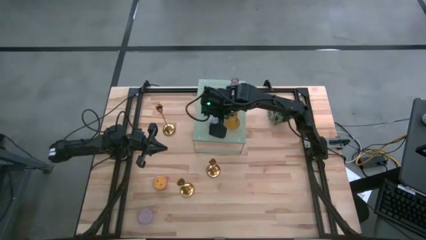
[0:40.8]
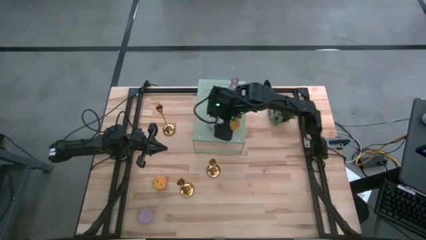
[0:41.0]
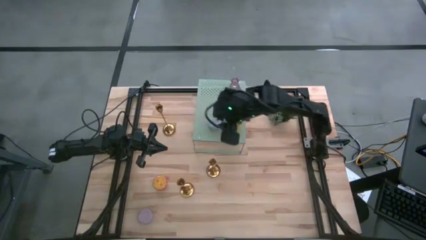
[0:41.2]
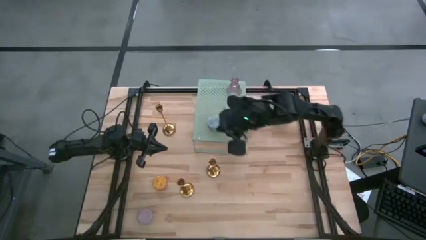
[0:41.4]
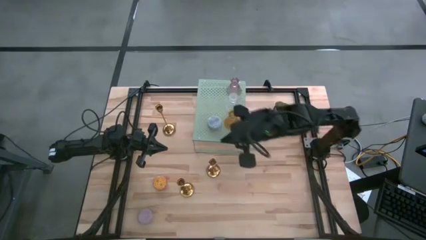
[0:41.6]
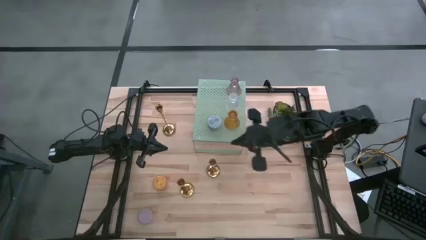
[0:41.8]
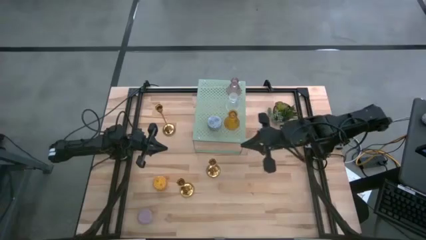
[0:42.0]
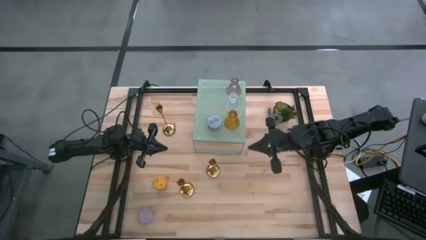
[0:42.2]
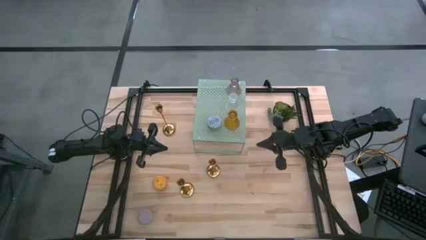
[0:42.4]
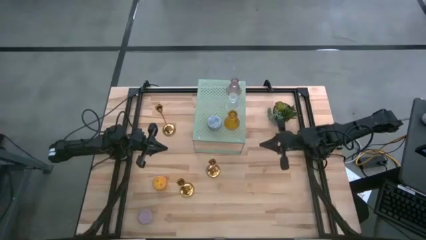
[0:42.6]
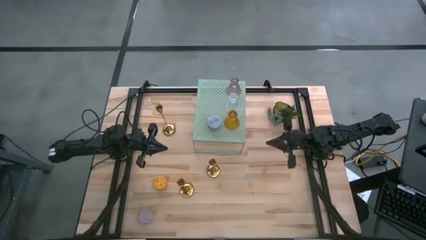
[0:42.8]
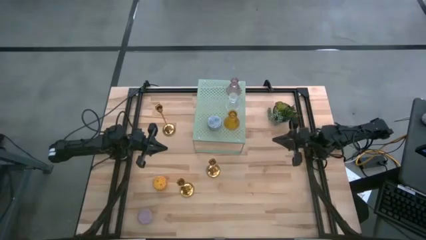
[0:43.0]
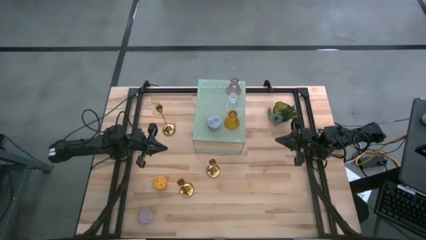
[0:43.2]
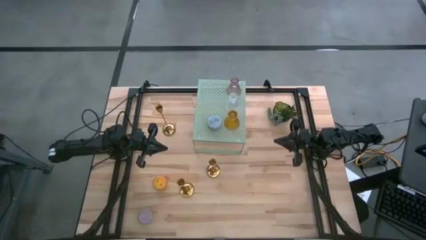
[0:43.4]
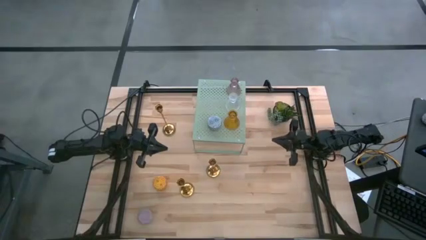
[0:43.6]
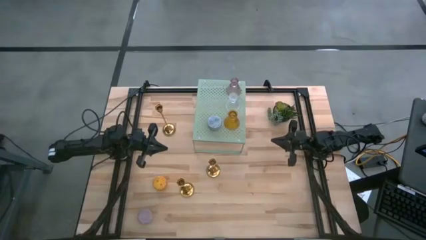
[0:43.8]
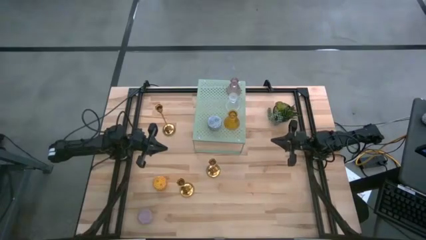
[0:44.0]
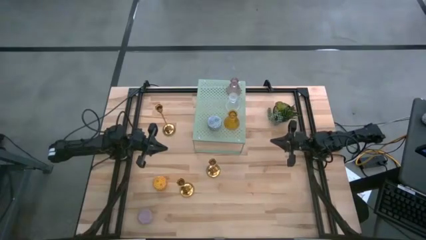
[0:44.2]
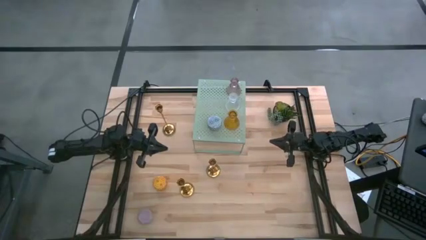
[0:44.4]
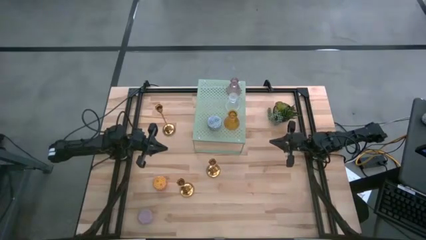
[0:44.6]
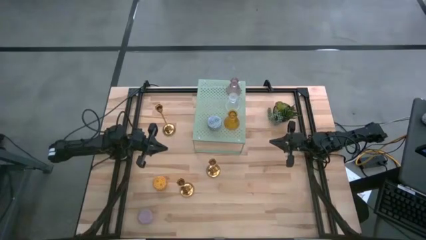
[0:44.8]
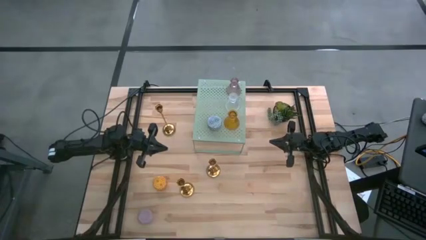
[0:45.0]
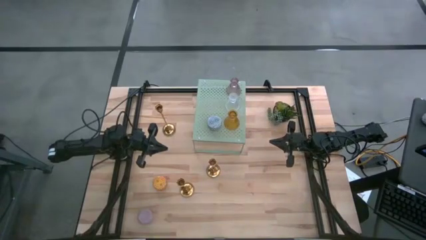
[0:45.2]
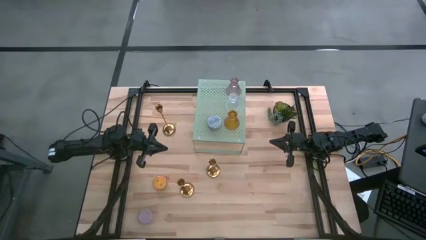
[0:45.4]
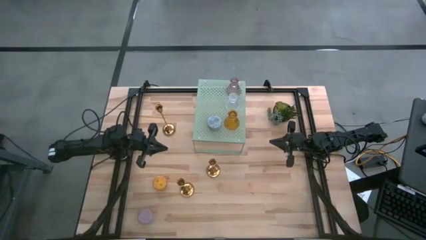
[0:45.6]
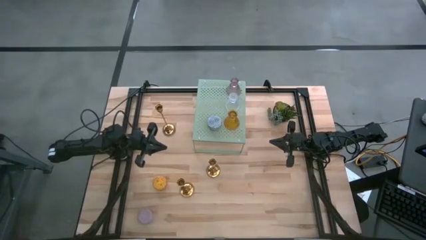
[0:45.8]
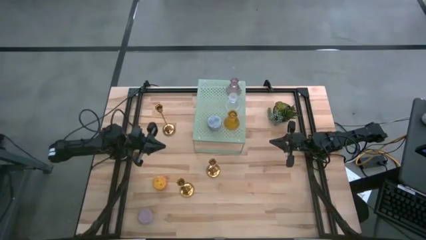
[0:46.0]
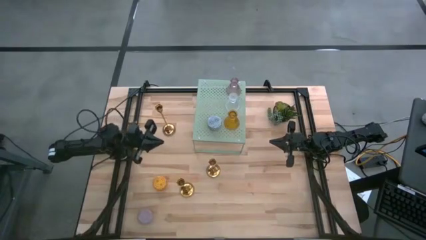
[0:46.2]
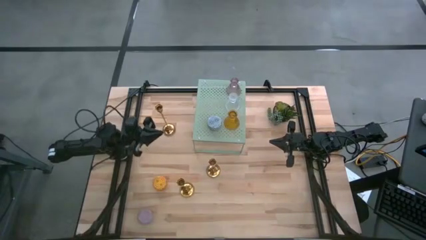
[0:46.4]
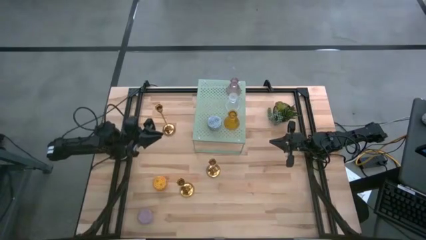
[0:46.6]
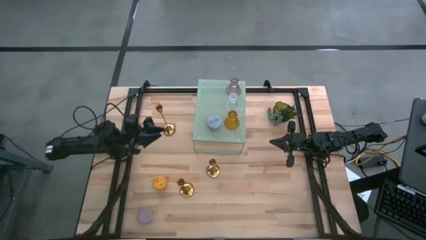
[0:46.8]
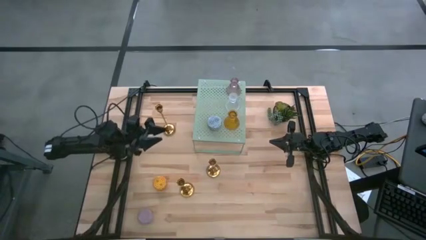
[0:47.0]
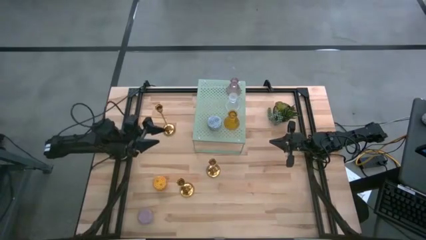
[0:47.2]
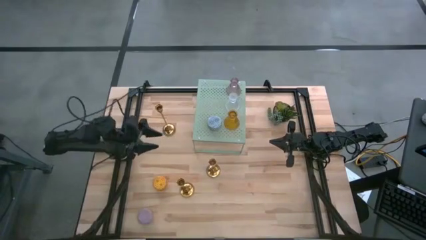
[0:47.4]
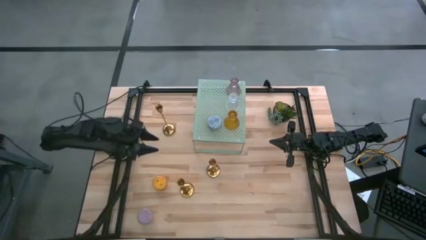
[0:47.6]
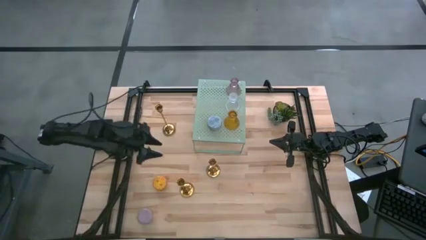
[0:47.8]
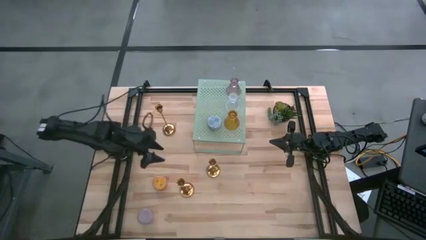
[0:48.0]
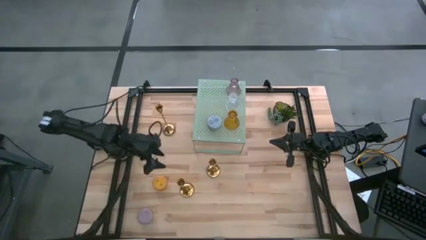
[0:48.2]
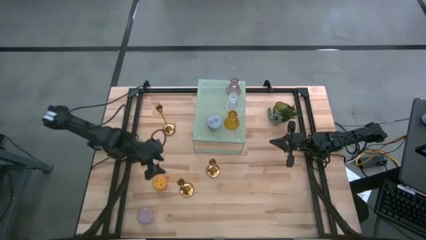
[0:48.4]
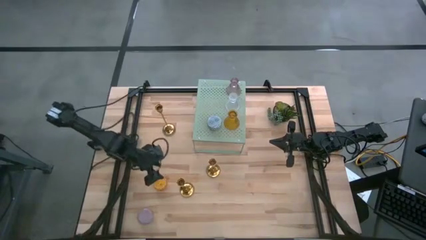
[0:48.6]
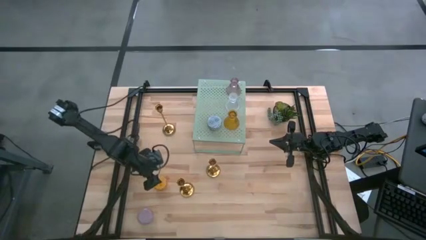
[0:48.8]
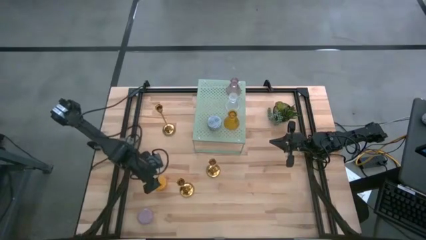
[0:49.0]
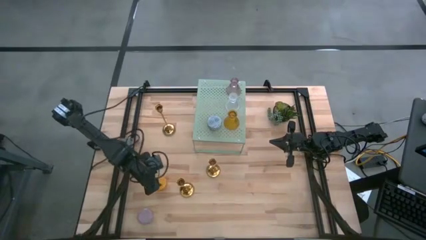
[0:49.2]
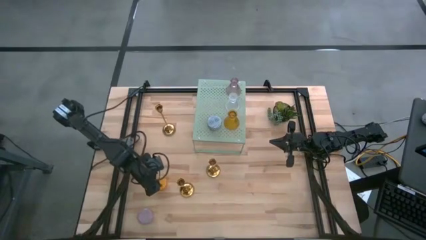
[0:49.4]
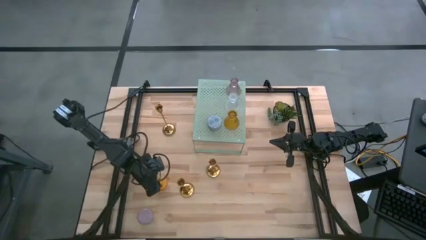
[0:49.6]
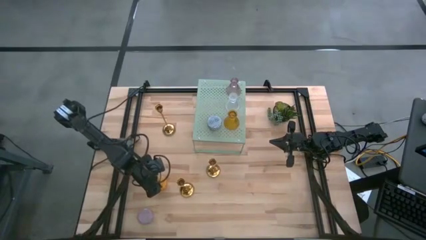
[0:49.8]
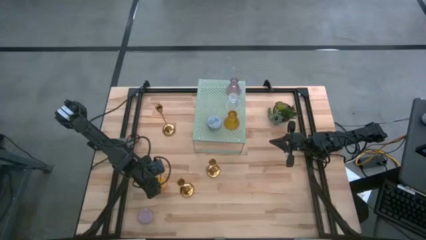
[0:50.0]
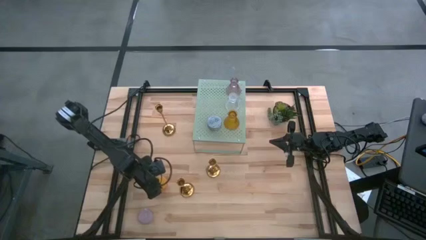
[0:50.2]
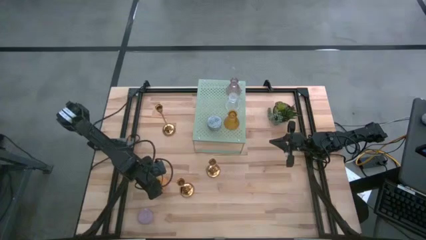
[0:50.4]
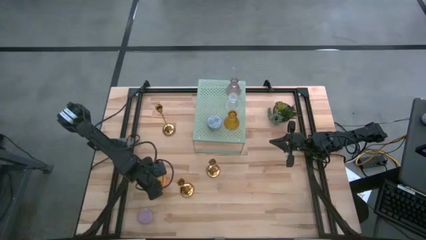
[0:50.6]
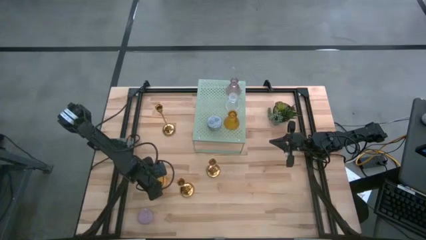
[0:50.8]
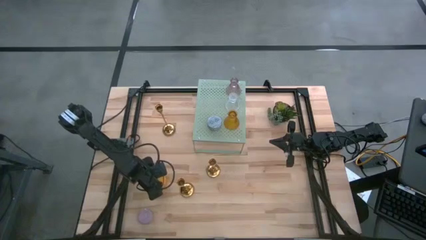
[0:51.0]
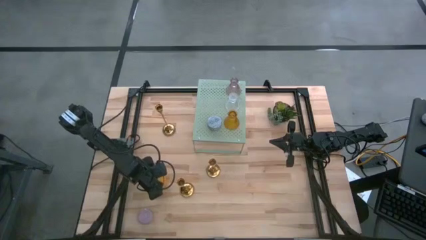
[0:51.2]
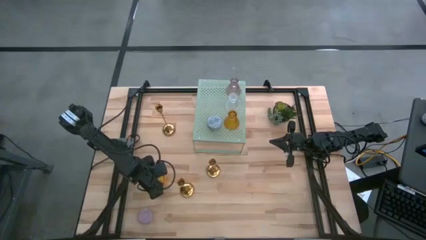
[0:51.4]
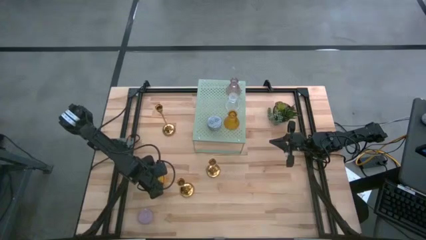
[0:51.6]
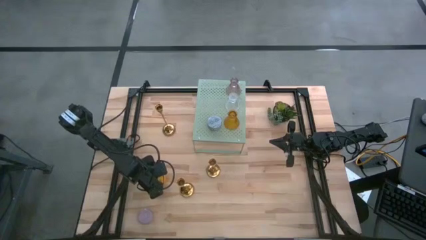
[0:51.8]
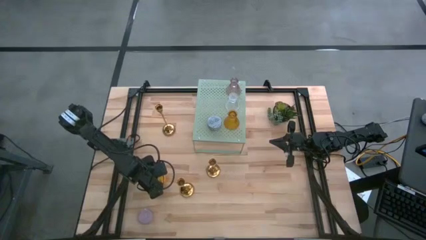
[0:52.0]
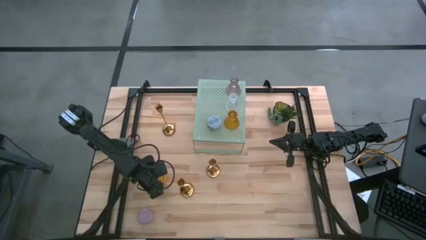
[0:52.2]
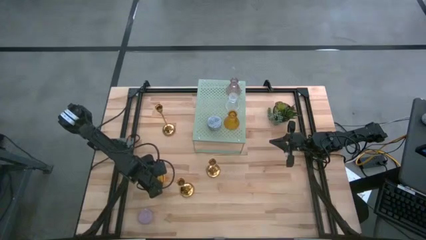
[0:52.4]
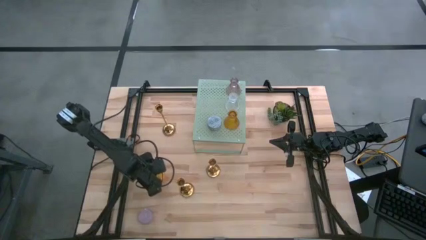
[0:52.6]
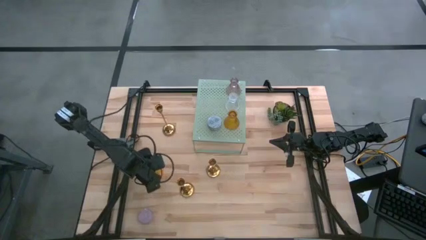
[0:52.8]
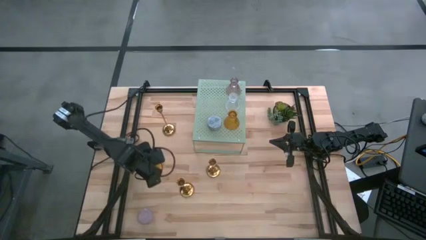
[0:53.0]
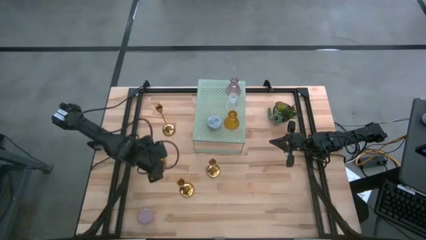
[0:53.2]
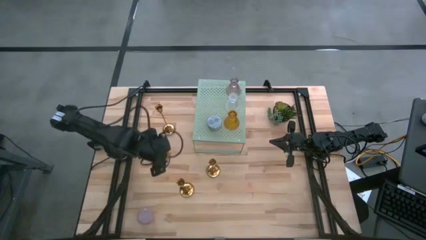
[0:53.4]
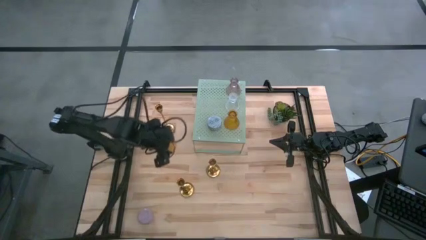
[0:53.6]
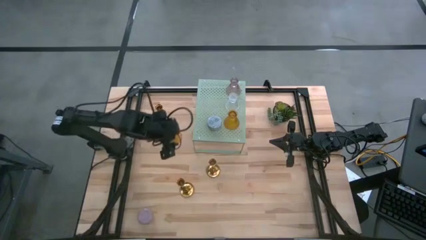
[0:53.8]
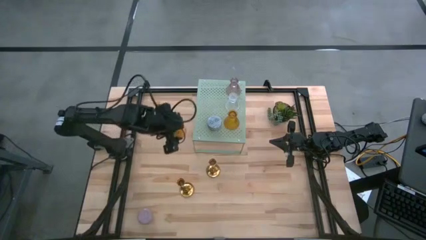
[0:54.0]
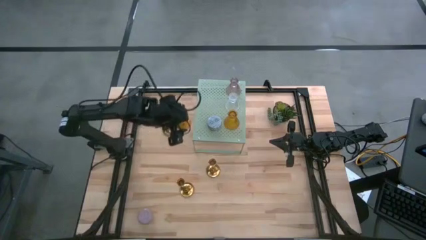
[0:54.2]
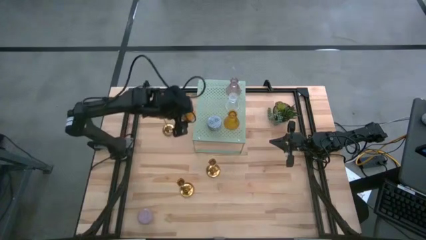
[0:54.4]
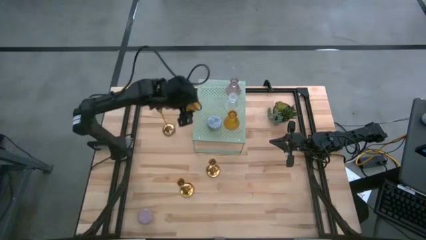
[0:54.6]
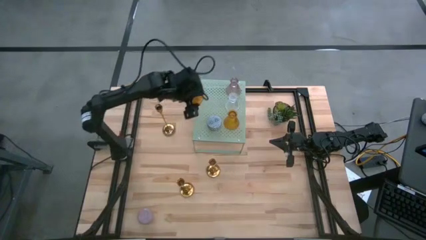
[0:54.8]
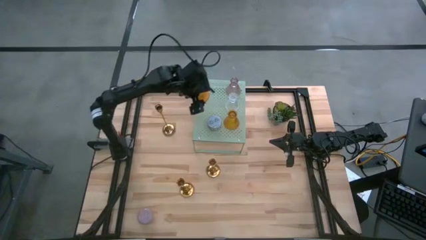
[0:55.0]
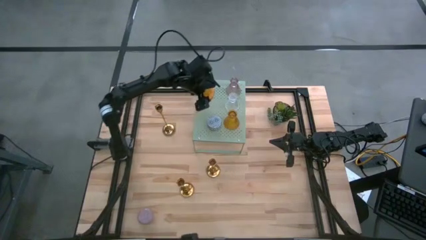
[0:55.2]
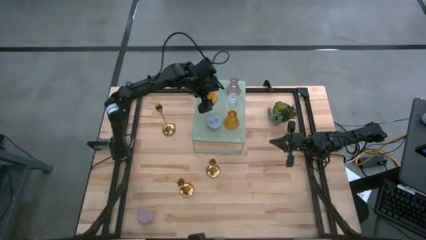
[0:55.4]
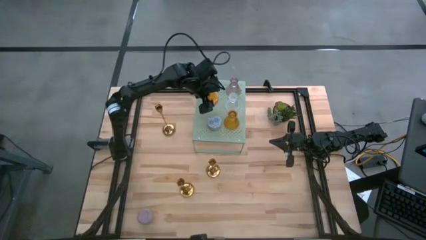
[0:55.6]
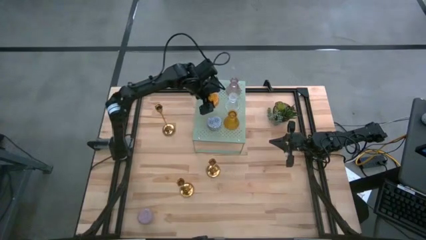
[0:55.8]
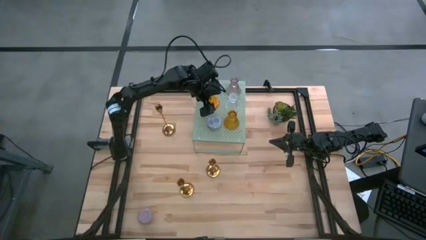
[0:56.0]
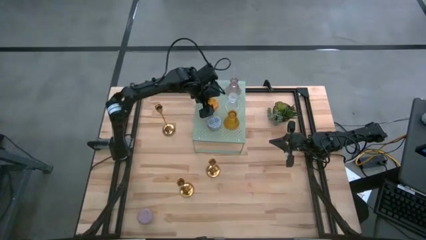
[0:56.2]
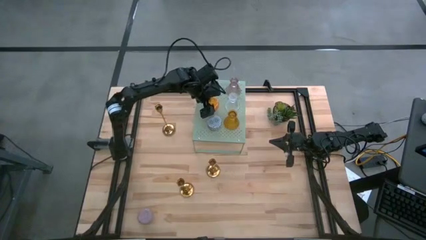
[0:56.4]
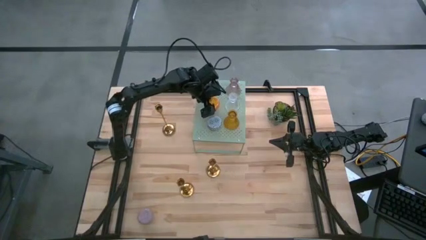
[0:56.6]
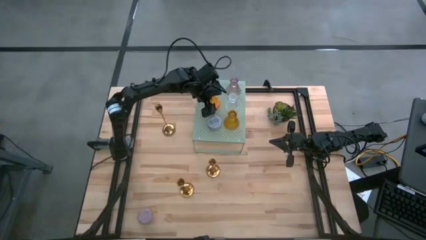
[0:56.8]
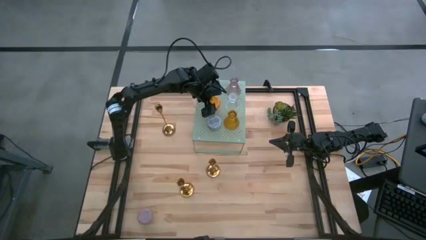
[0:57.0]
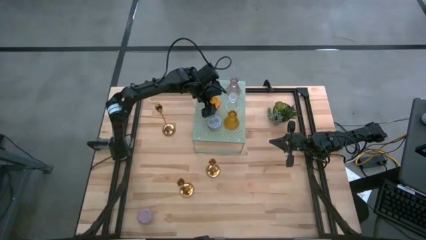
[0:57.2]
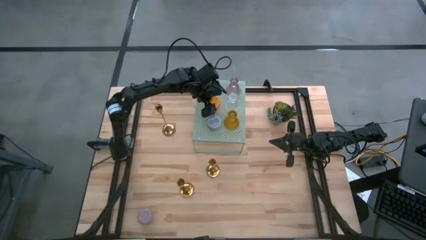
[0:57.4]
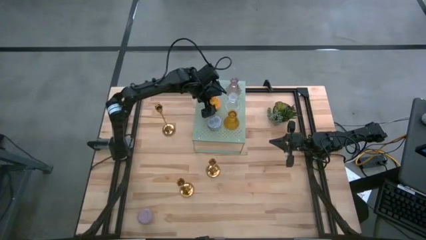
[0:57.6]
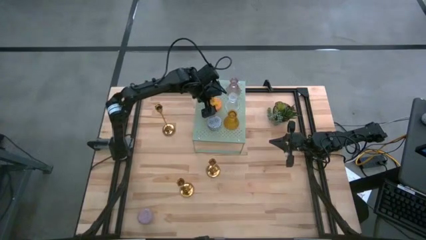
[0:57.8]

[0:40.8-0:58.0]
Task: Stock candles on shelf
Put the yellow scented candle and aligned it with the other white green scented candle on the shelf
